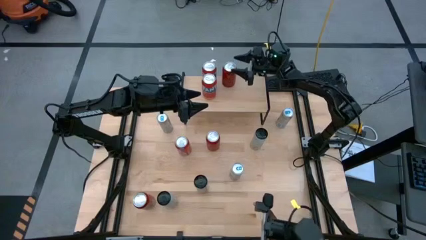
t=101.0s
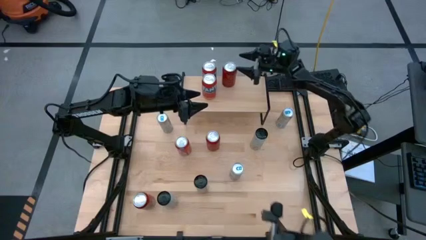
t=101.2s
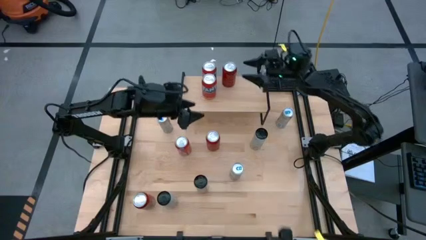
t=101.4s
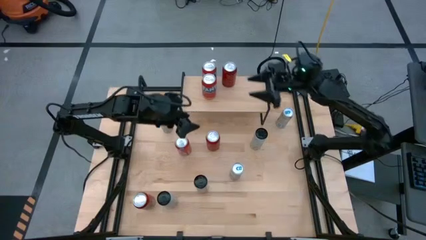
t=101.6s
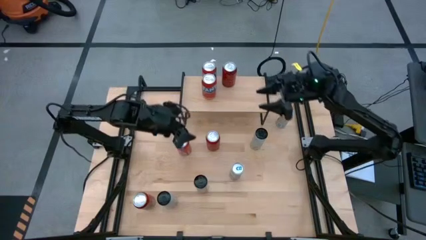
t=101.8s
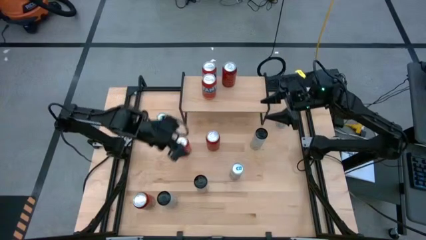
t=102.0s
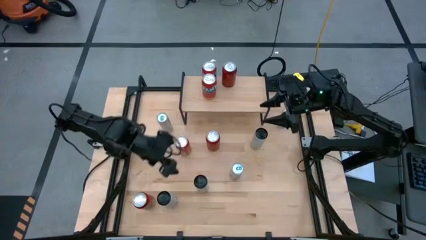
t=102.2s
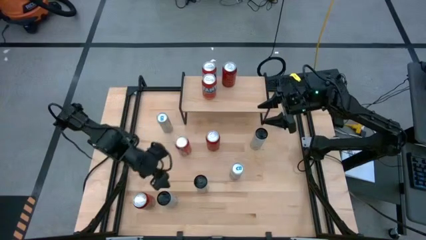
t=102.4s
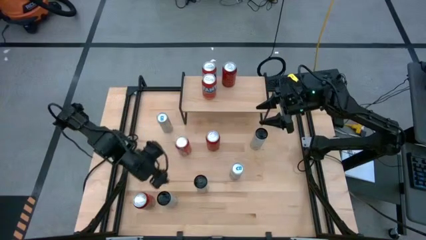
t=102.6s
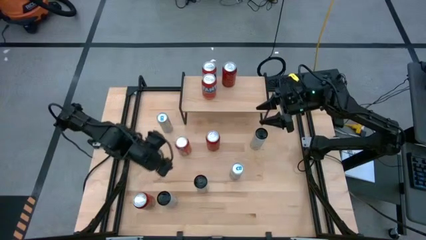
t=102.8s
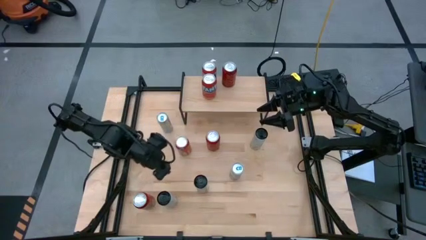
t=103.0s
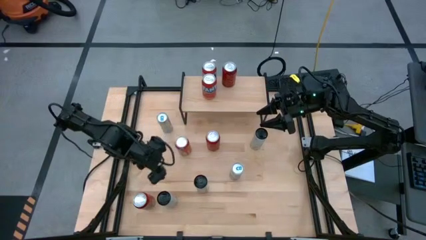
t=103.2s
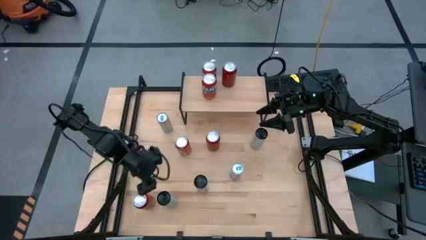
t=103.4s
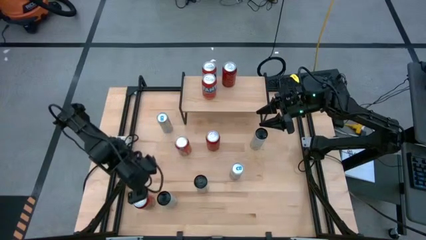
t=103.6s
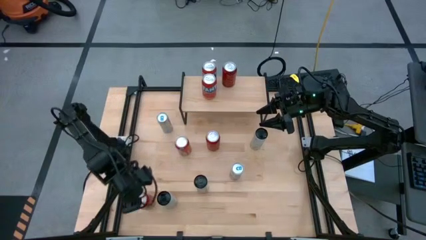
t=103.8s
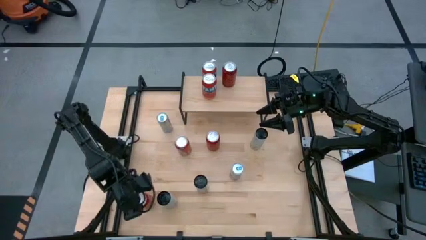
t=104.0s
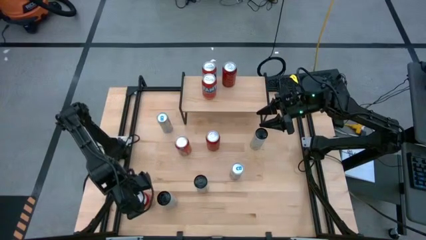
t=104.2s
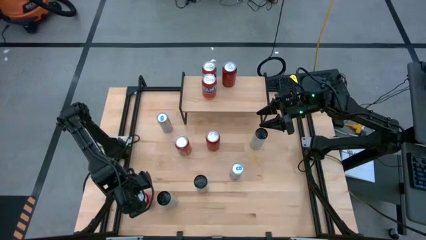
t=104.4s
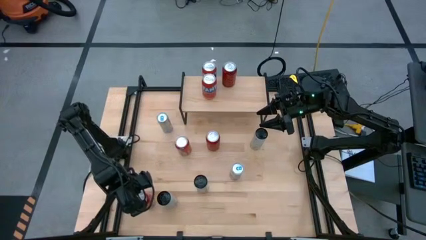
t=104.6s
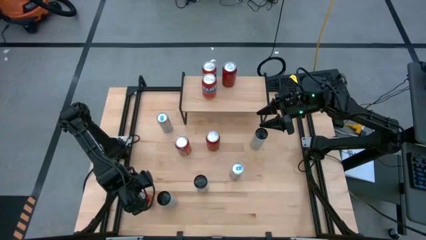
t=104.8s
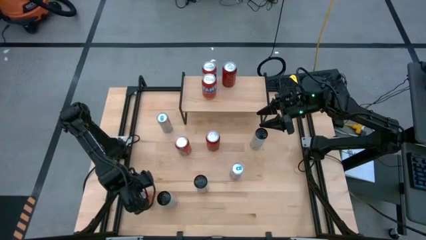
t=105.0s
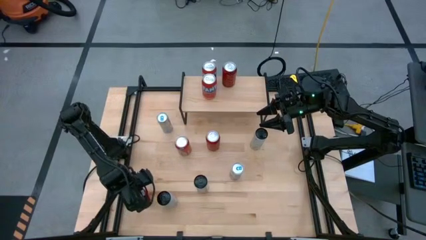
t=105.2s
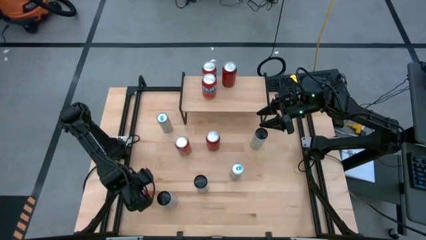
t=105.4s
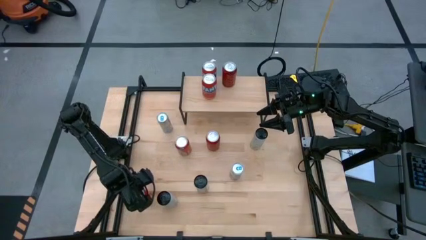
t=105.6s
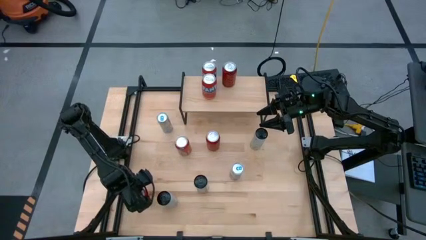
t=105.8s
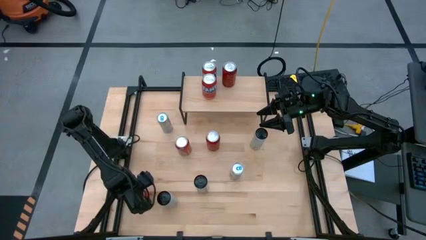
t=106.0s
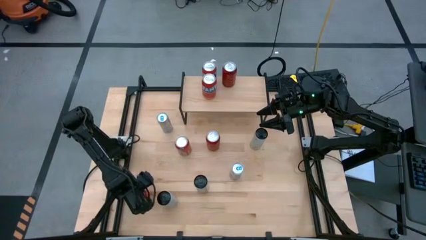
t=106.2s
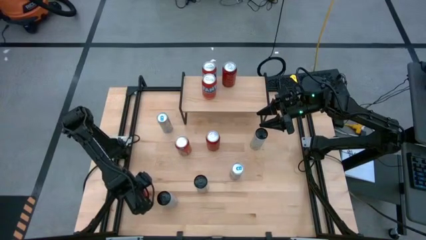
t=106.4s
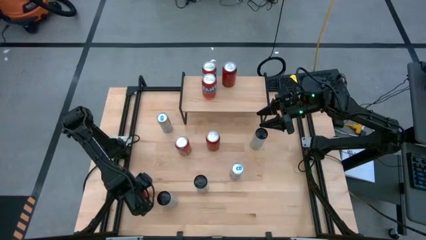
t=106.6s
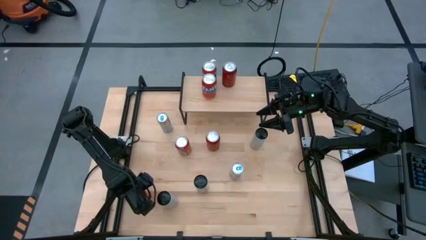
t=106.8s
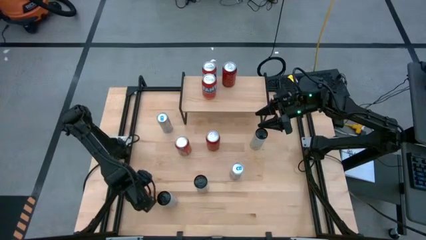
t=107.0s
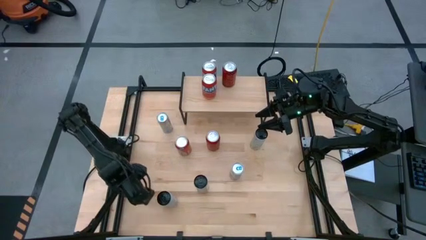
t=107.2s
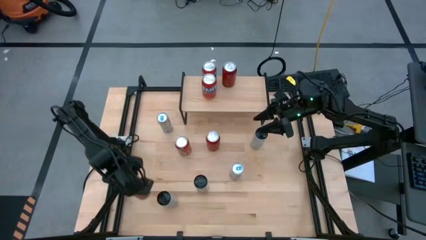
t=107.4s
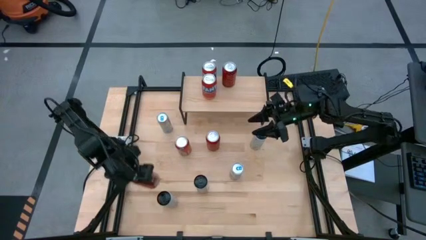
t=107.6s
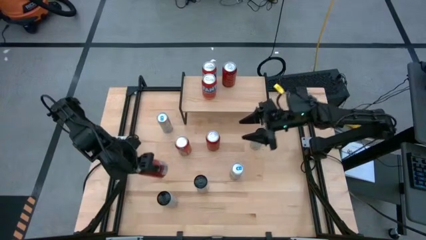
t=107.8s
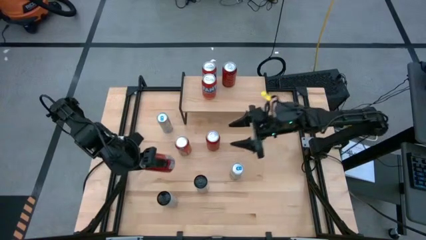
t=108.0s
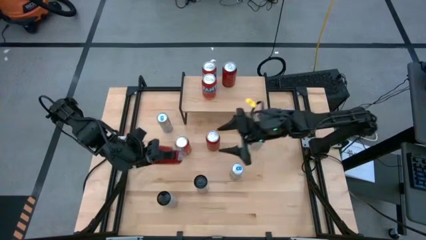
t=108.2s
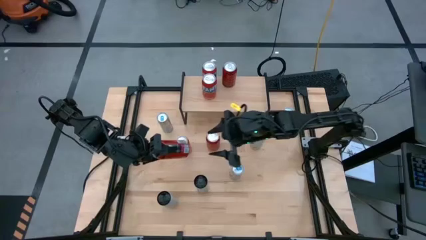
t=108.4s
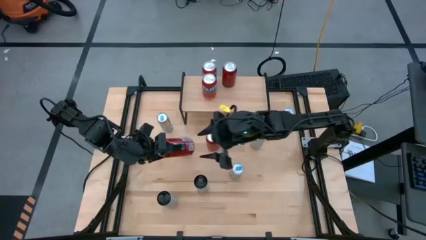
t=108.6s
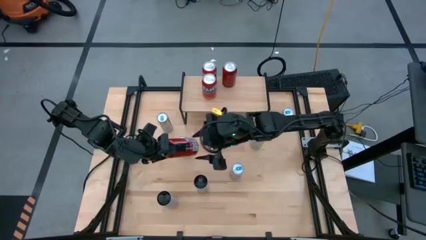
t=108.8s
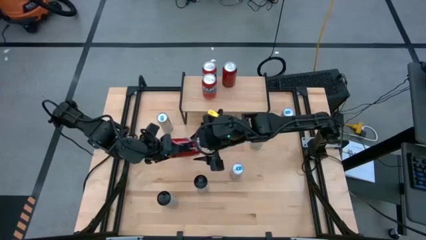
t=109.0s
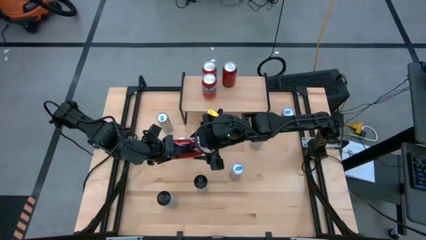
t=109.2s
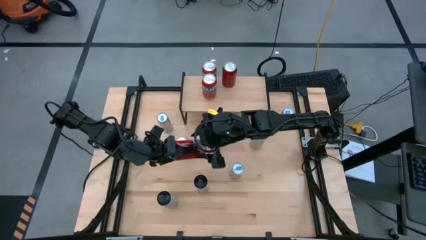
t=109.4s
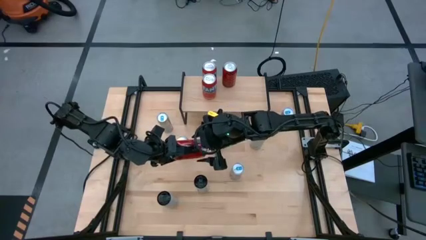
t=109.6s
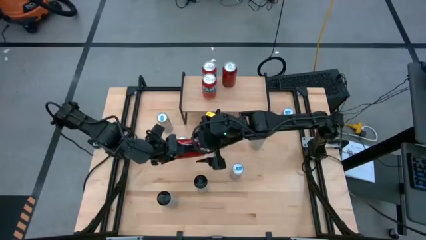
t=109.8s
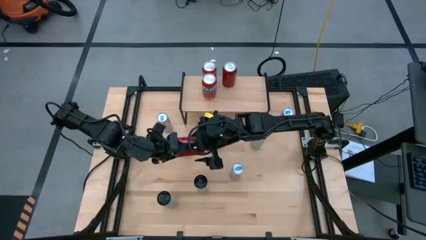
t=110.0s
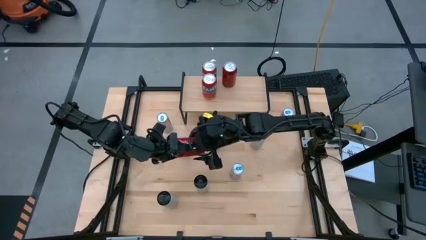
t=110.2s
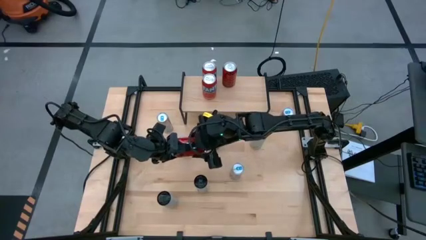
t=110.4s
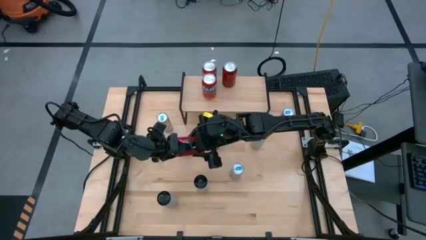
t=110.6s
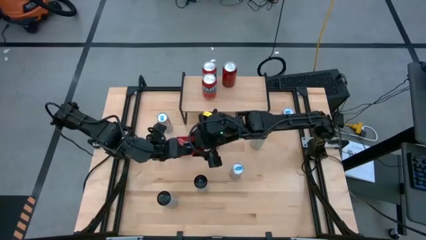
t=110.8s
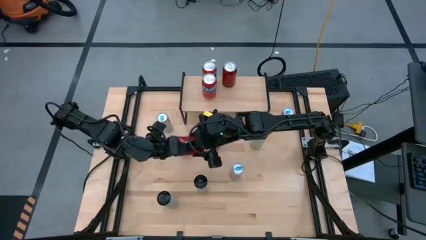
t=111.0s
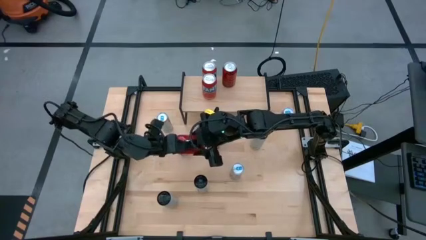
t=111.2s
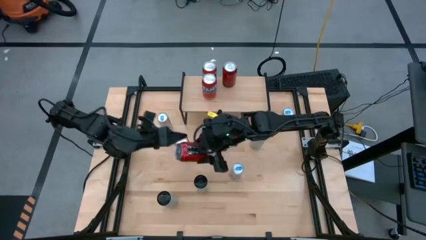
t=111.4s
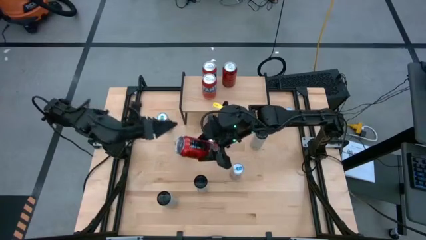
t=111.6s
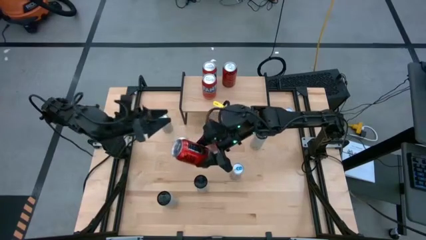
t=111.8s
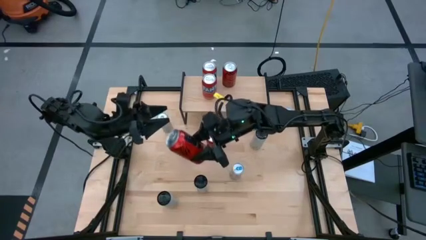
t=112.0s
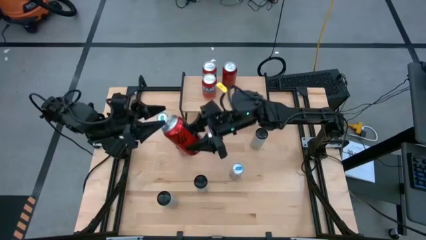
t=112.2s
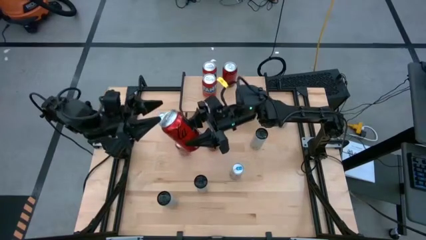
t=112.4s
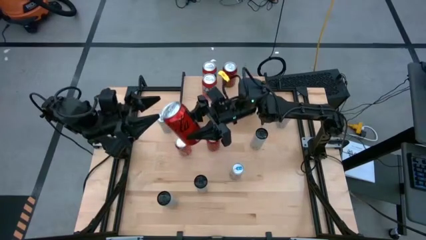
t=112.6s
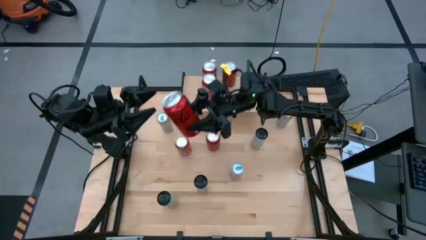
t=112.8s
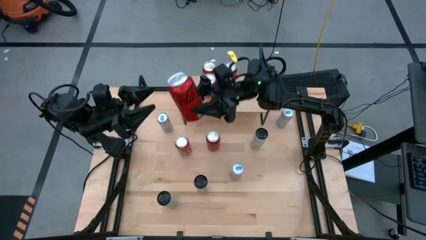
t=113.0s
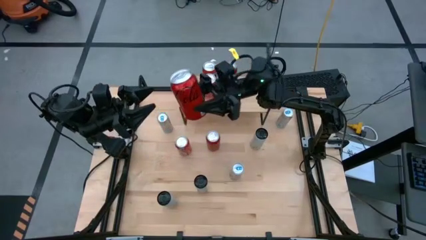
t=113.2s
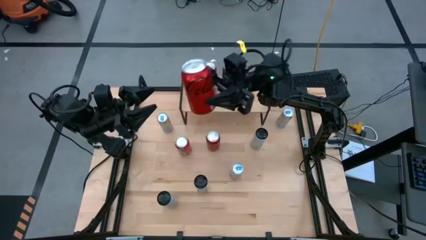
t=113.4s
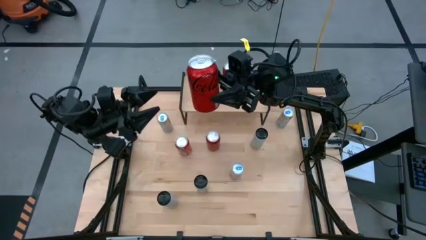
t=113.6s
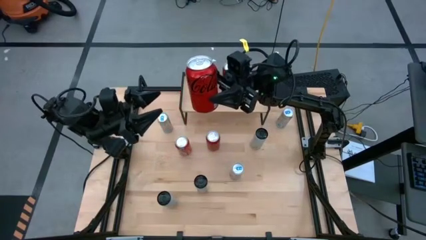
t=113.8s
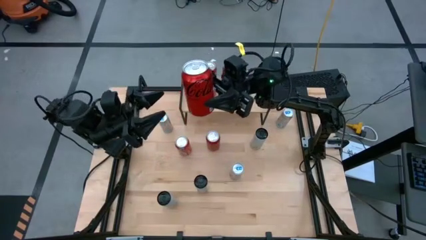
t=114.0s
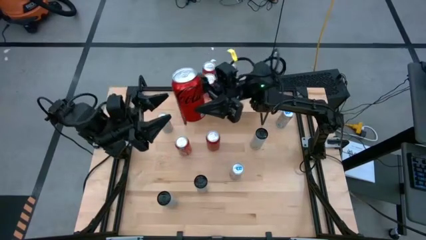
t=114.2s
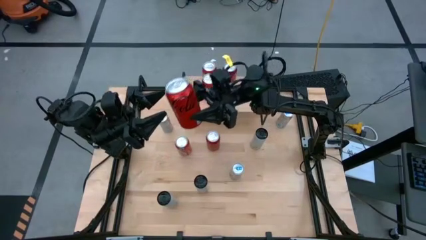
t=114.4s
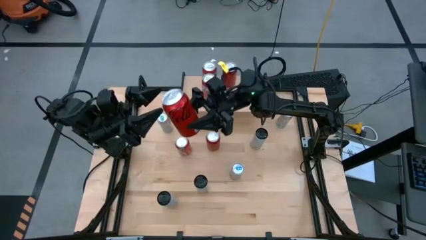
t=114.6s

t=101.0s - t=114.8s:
Task: Place canned beverage on shelf
Put the bottom red-black soda can on the shelf aligned with the other red-black soda can

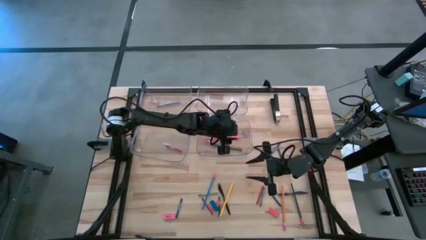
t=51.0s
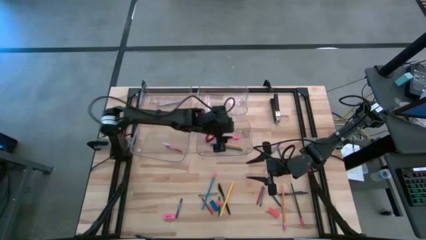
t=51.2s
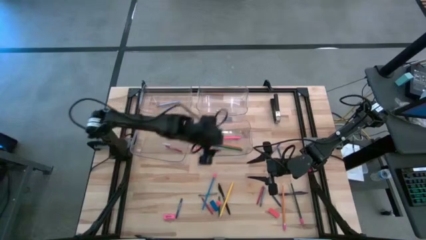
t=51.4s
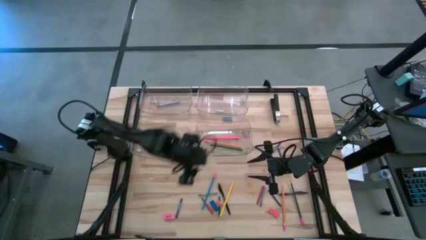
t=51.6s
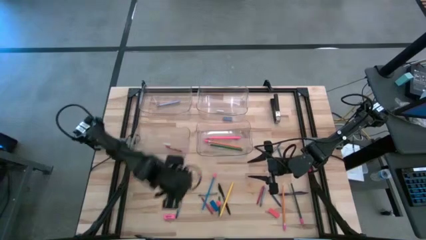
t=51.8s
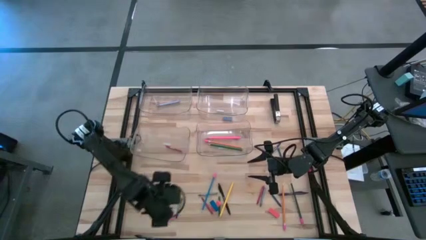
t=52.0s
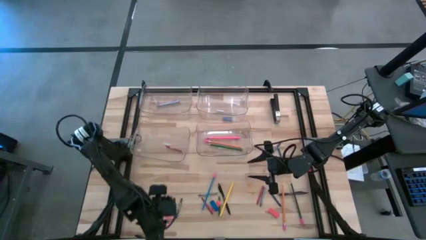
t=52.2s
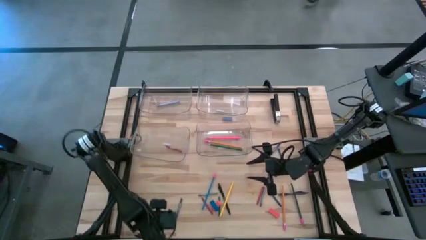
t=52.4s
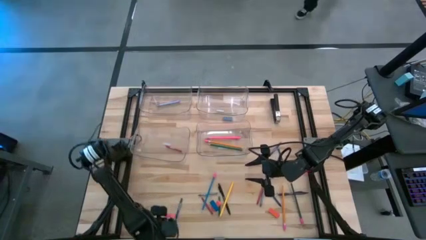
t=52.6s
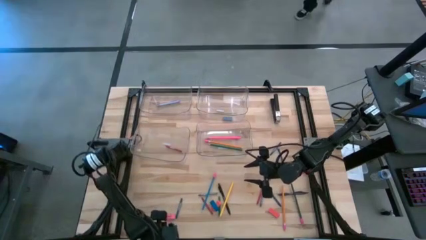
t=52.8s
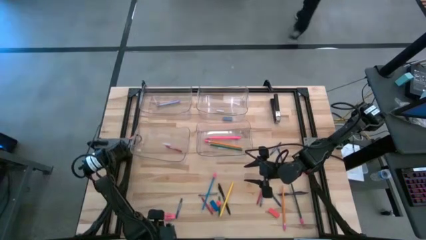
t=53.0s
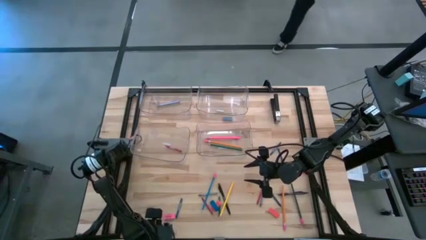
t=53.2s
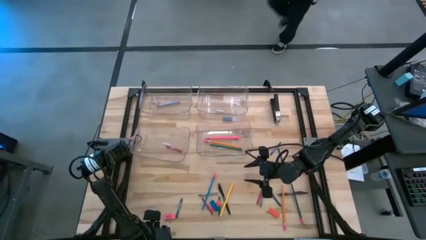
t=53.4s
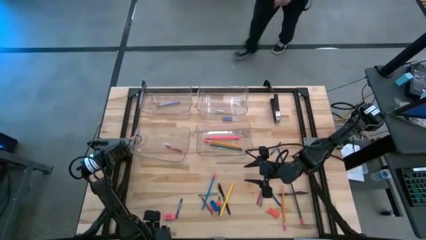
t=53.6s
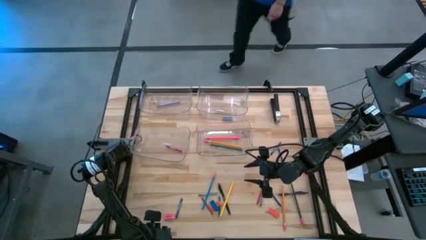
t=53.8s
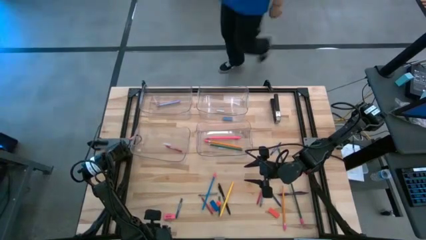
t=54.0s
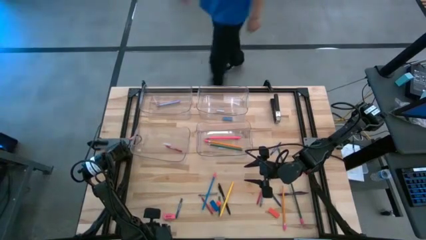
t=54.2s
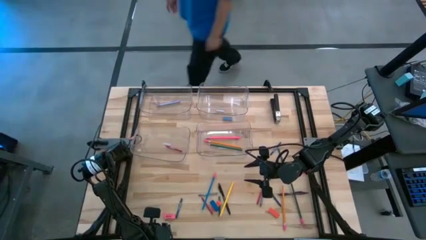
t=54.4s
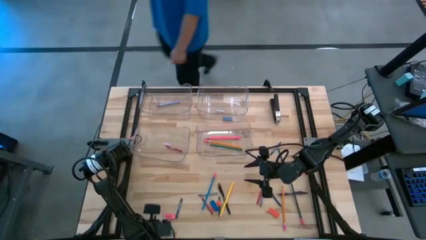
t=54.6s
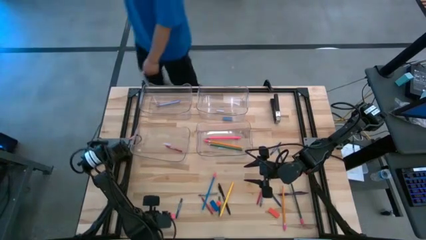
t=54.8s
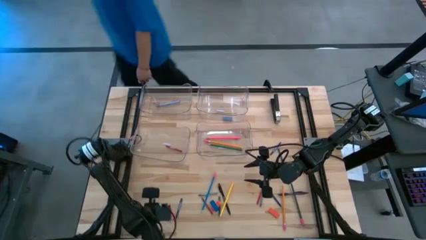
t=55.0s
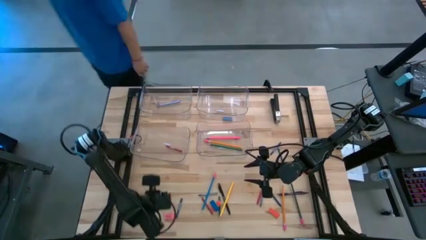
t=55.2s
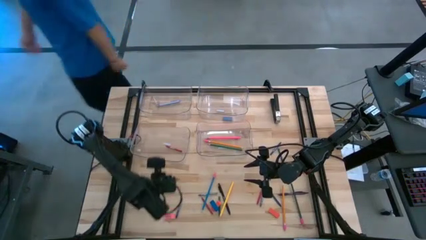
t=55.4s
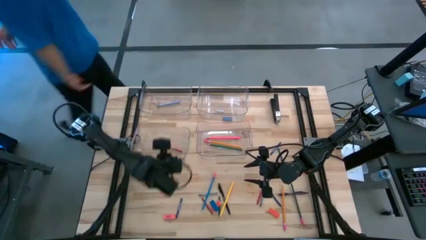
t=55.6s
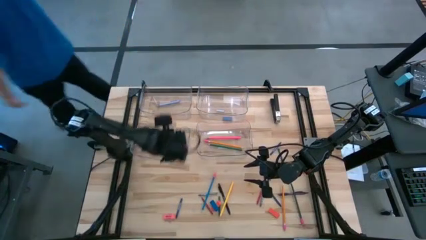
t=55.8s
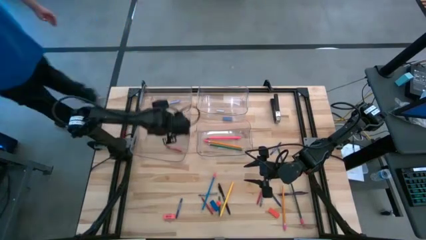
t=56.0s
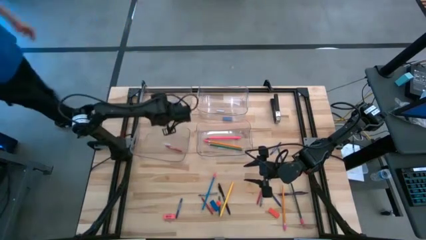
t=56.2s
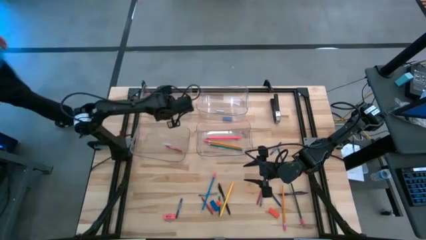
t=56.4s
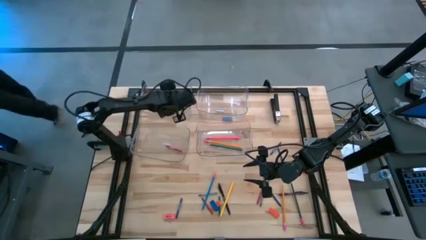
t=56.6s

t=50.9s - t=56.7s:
Task: Sort crayons/erasers/pens/pencils in bins
Put the left black ball pen into the top left transparent bin
